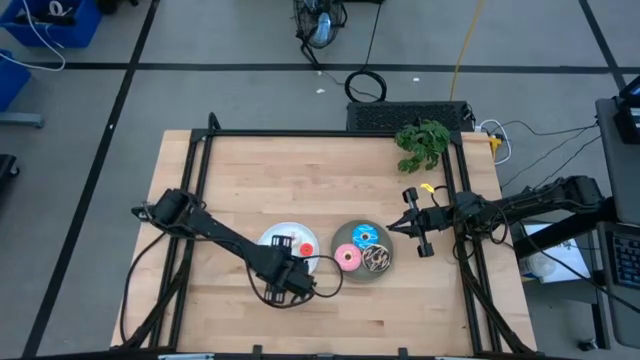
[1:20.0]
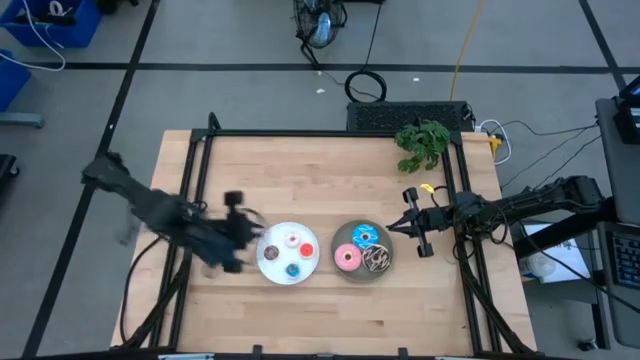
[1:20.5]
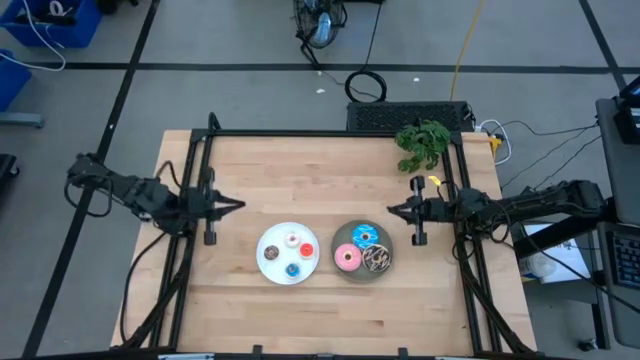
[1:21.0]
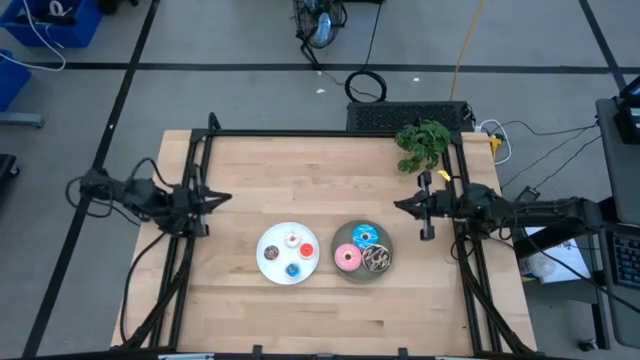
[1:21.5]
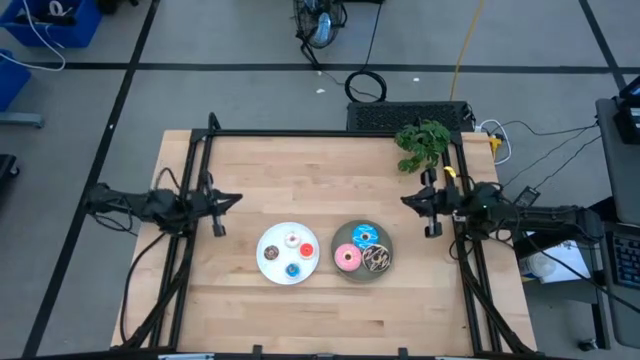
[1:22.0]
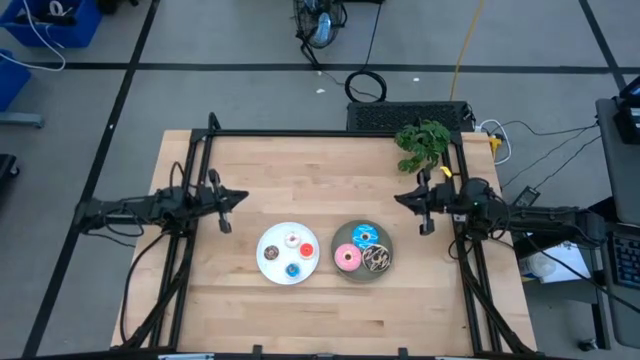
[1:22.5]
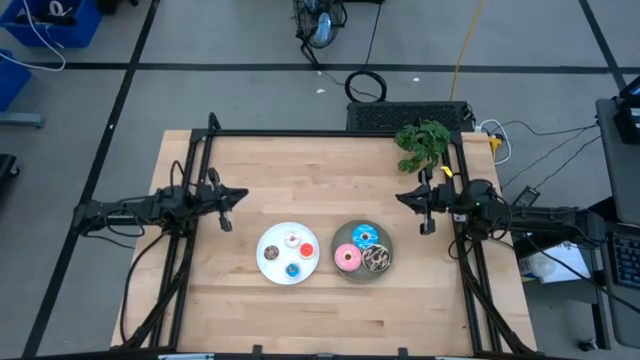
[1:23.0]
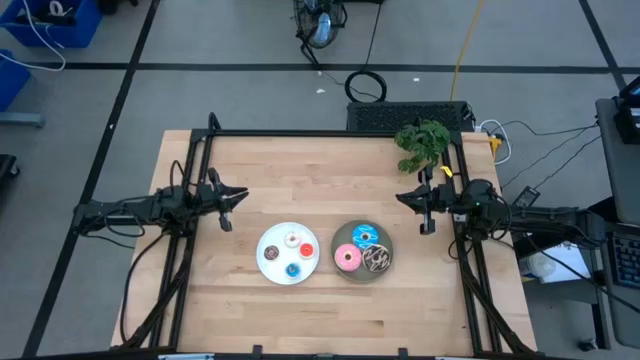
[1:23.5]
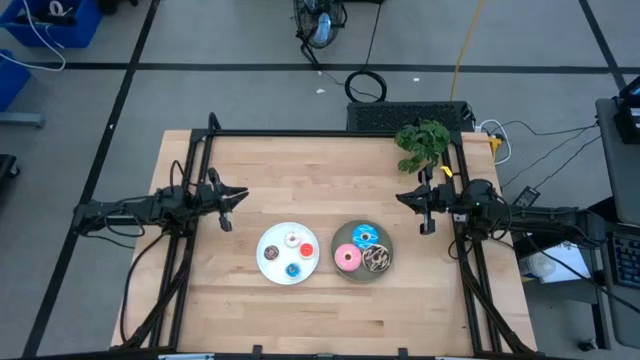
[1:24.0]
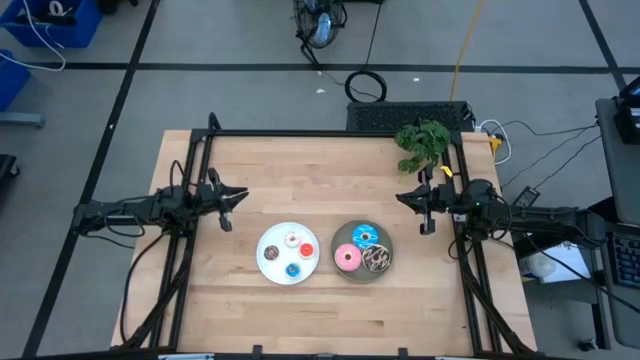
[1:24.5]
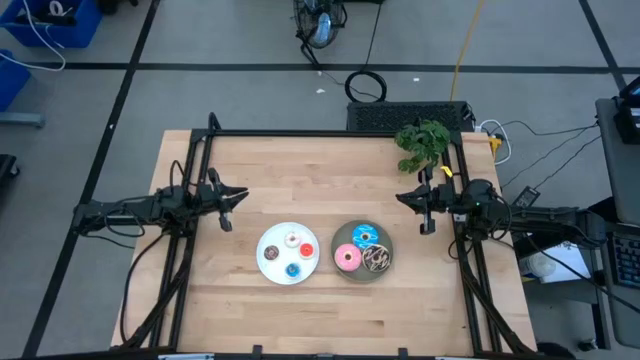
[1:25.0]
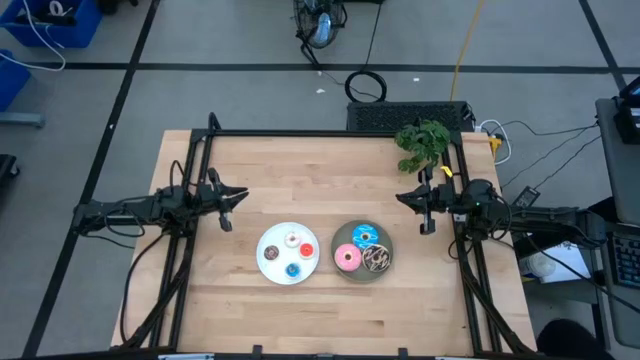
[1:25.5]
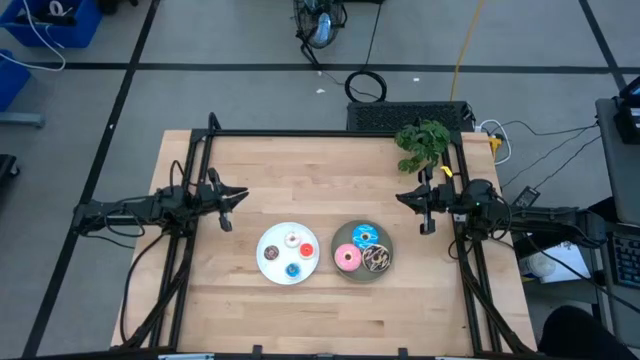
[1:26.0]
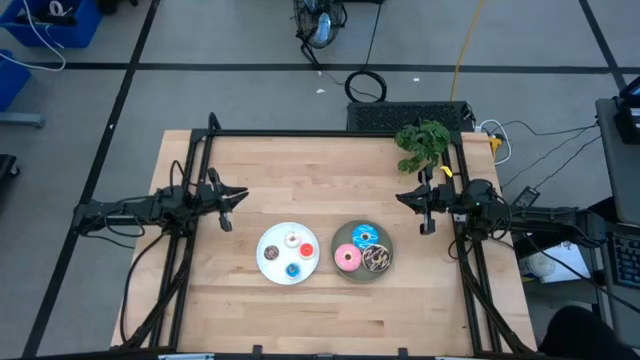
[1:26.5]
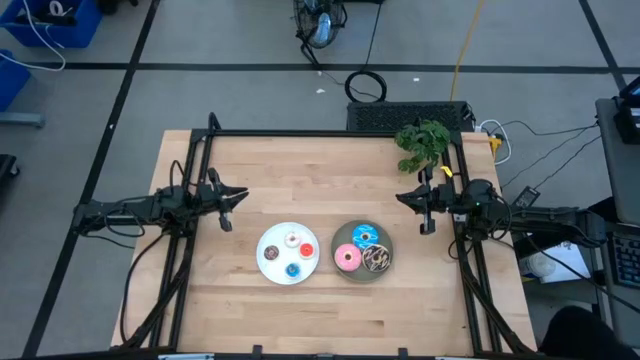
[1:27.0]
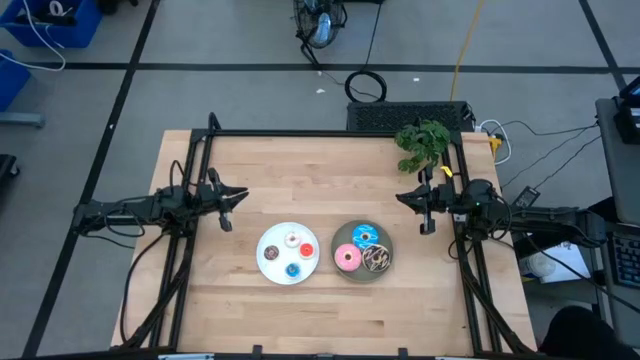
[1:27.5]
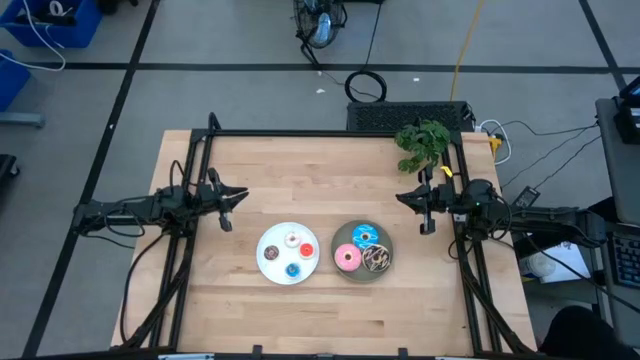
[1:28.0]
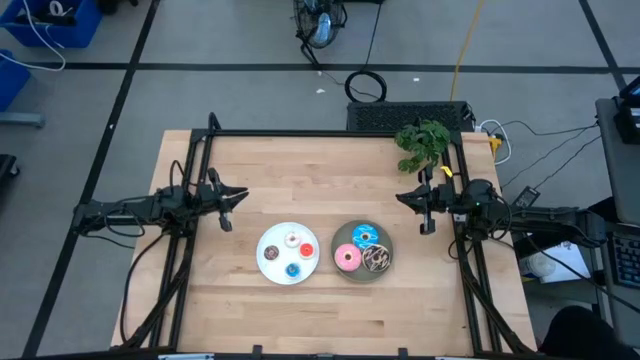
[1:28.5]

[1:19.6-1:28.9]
Task: Pick & Place donuts
Return to Home Position

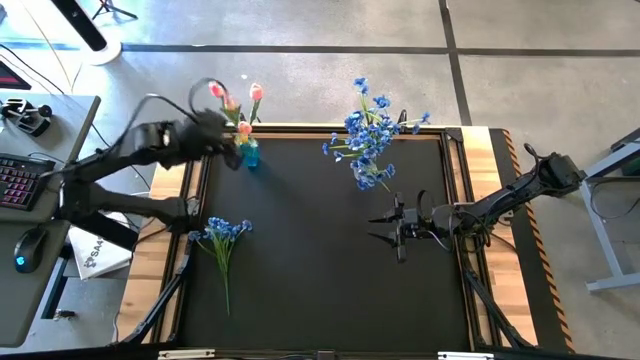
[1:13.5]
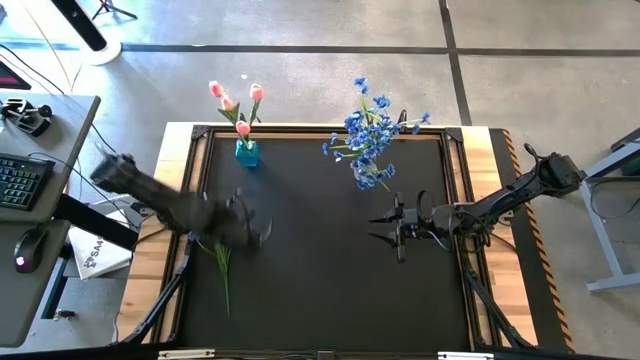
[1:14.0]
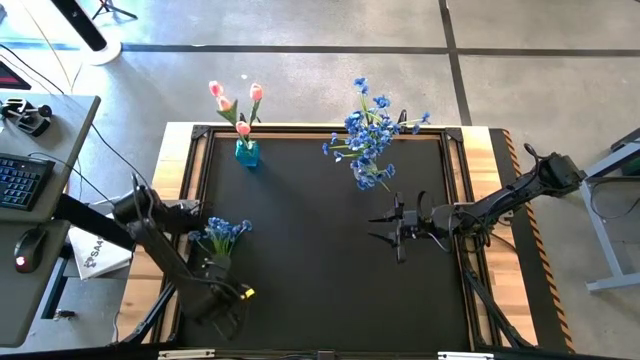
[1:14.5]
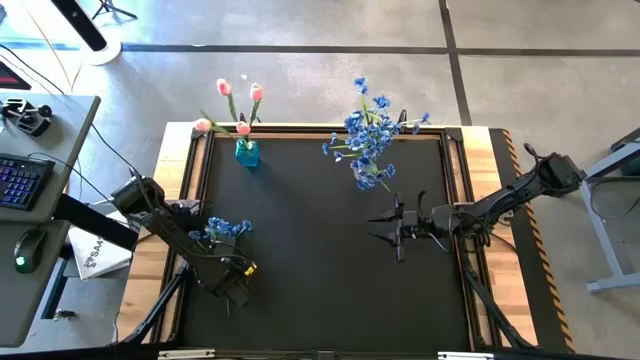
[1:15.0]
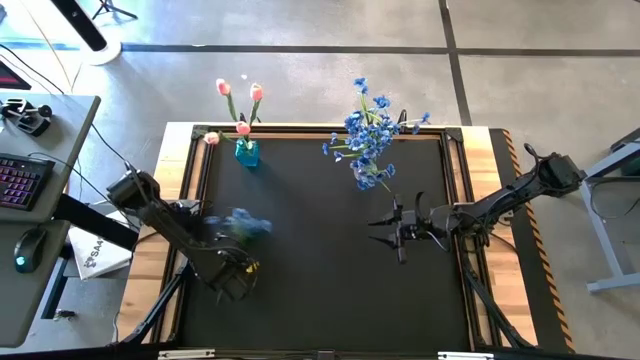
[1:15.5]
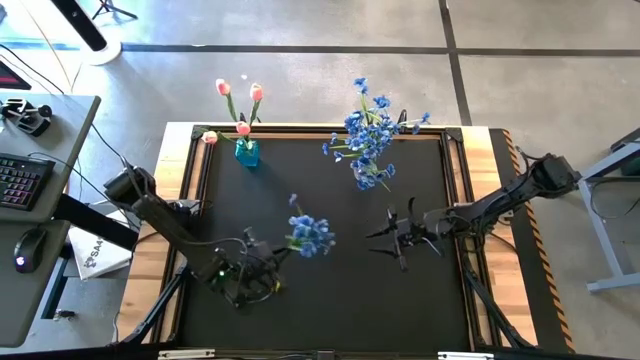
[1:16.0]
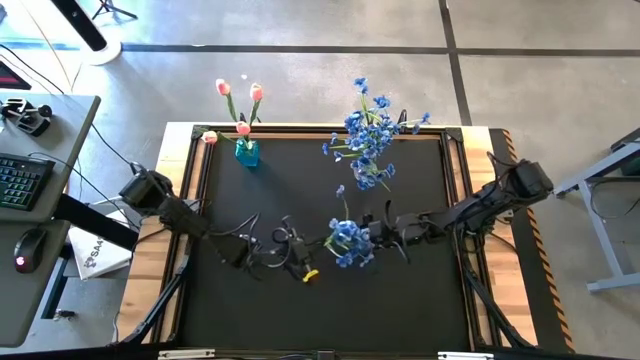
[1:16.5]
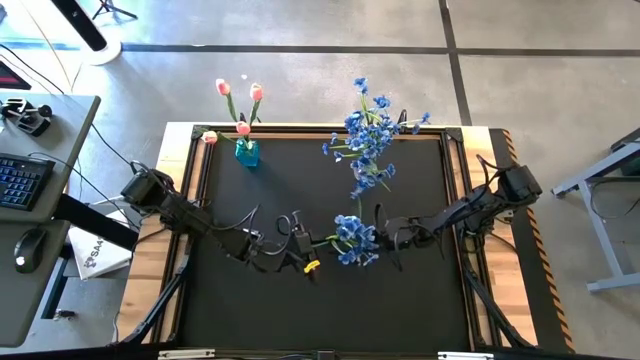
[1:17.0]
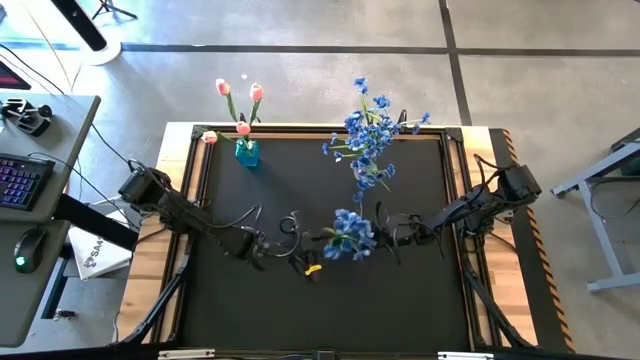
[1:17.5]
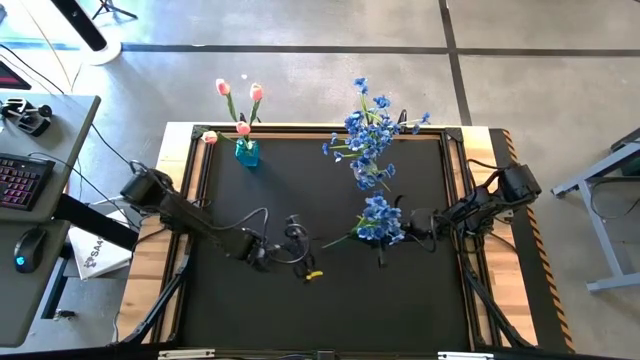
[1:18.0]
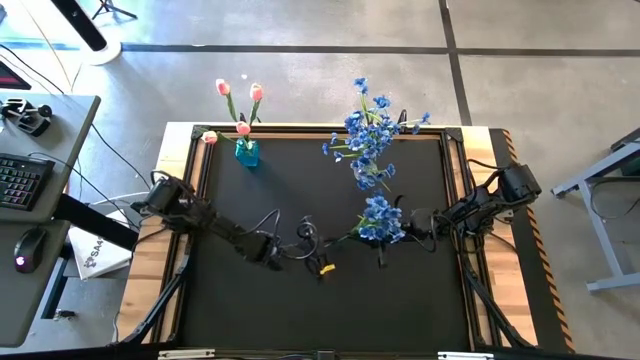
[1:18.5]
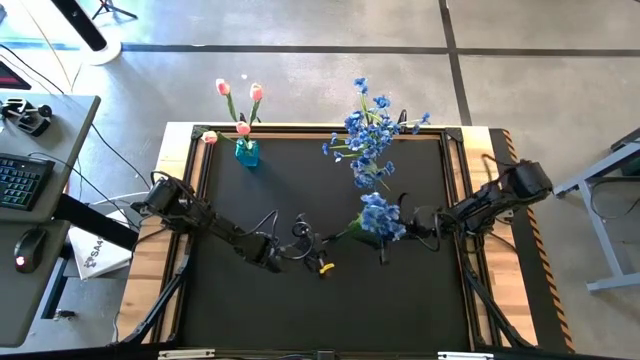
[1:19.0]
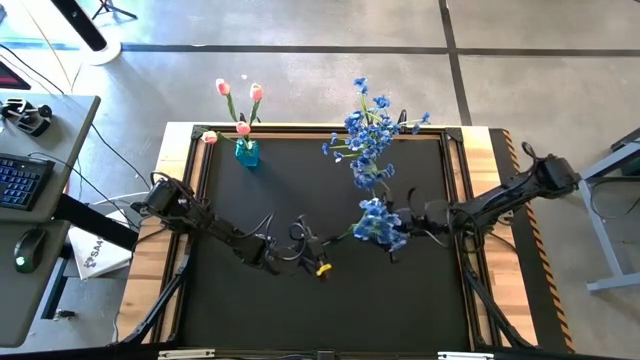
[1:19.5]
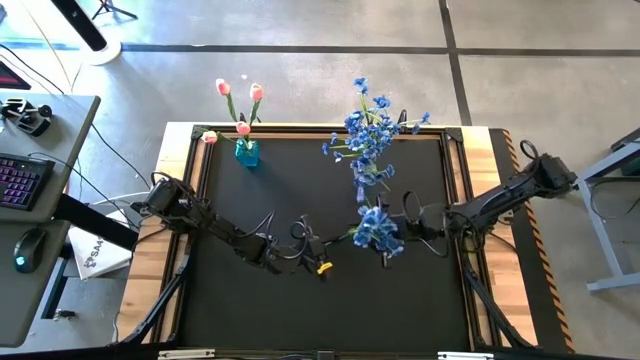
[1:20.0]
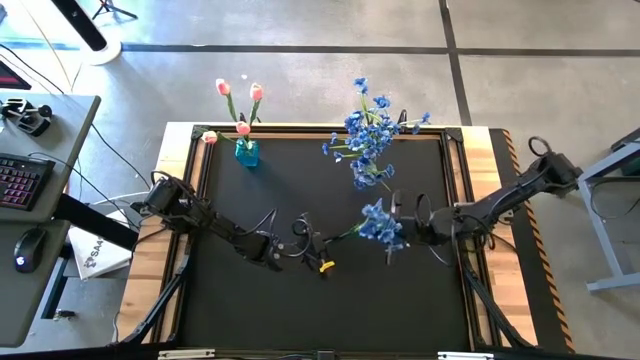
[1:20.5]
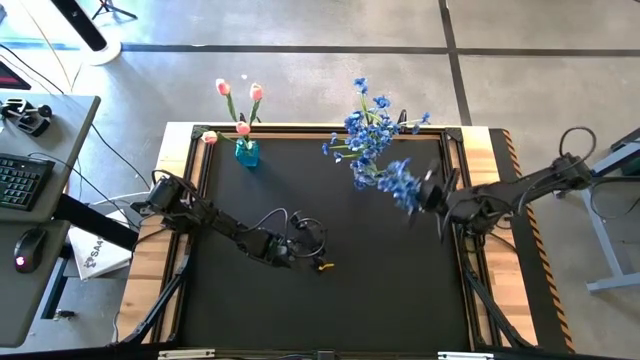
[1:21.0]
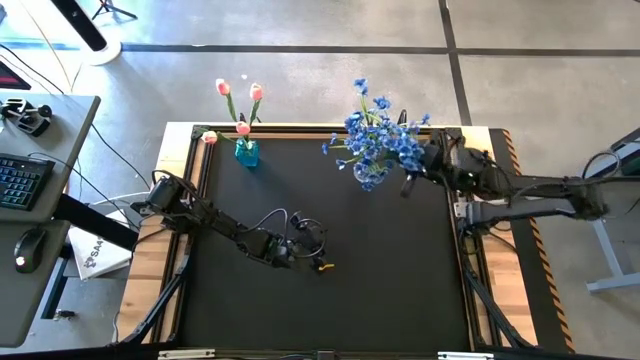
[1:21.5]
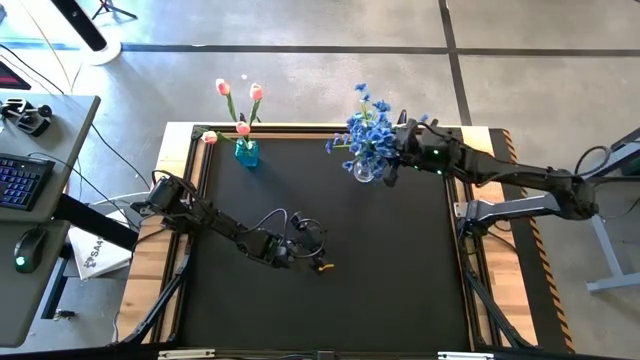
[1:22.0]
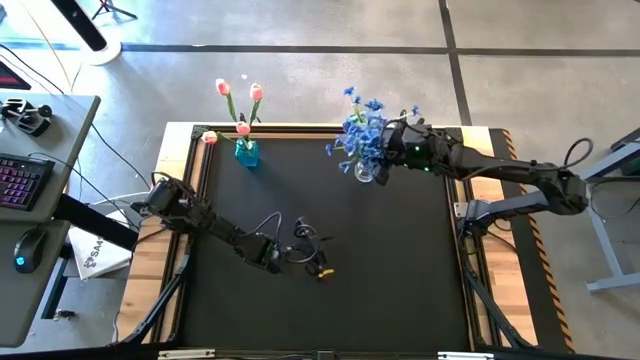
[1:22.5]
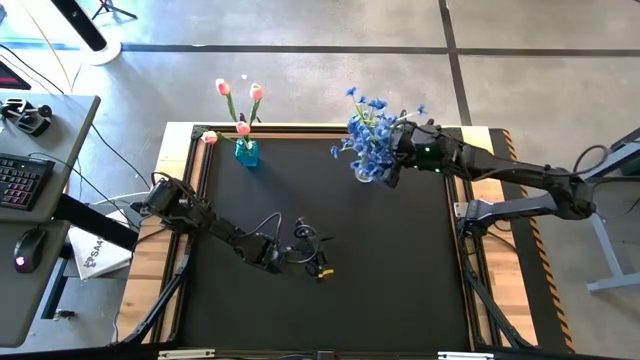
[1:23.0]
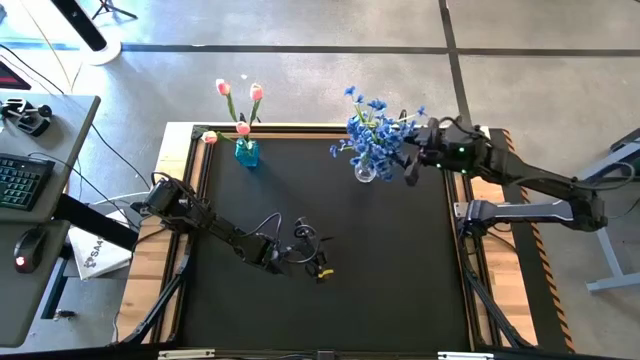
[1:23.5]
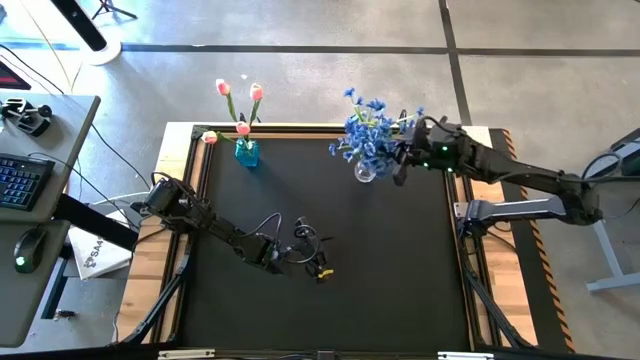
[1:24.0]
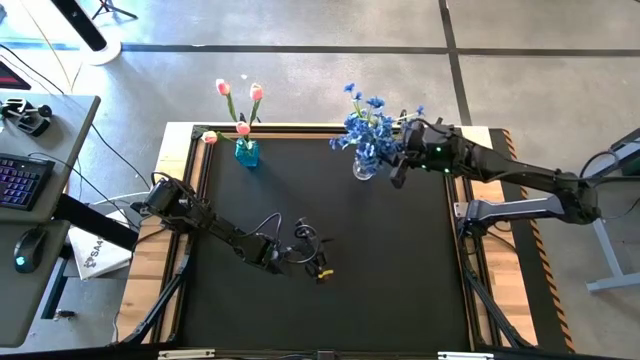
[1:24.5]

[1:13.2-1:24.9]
Task: Sort flowers into vase by color
Put the blue flowers into the transparent flower vase
